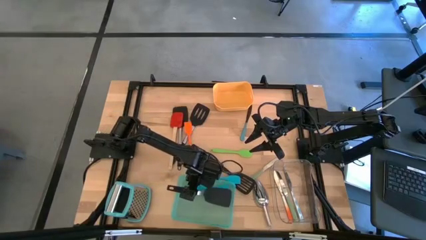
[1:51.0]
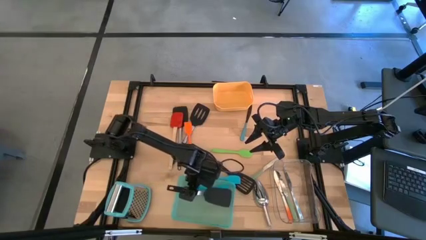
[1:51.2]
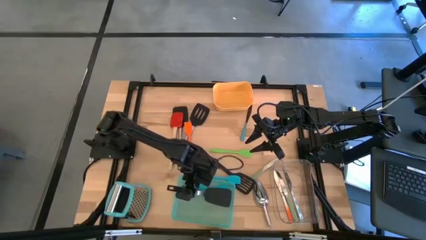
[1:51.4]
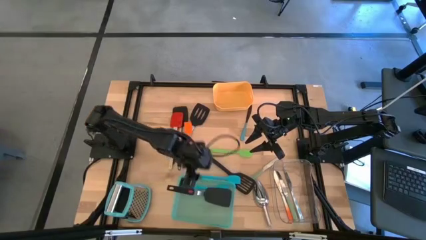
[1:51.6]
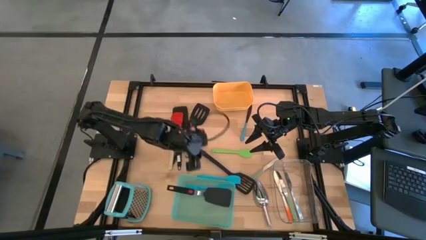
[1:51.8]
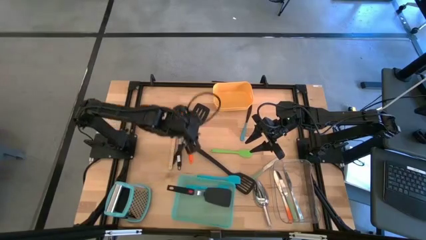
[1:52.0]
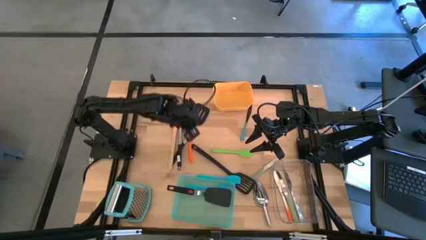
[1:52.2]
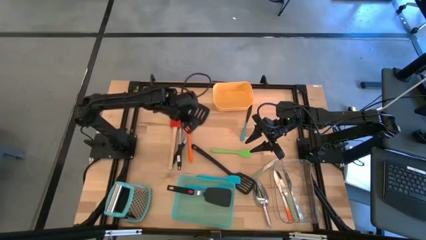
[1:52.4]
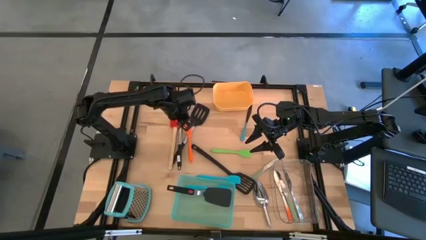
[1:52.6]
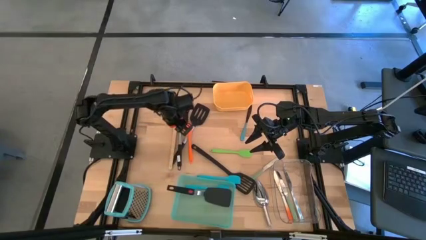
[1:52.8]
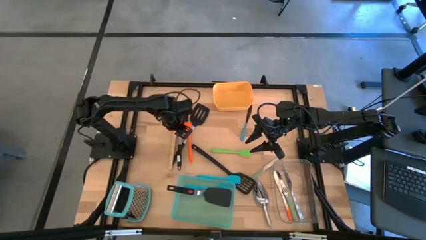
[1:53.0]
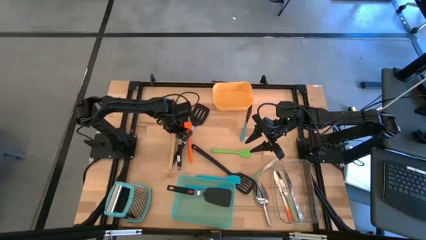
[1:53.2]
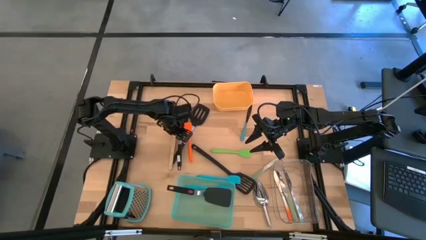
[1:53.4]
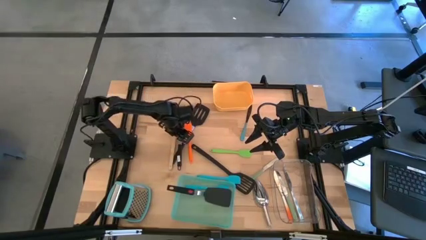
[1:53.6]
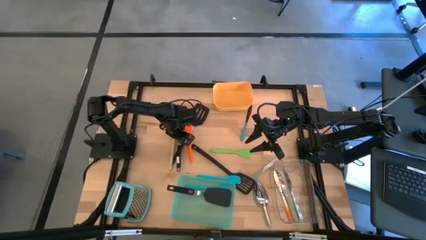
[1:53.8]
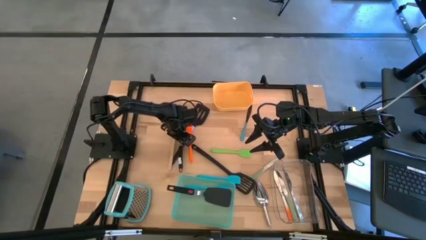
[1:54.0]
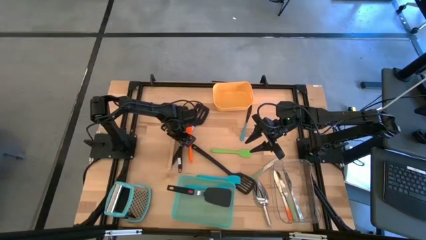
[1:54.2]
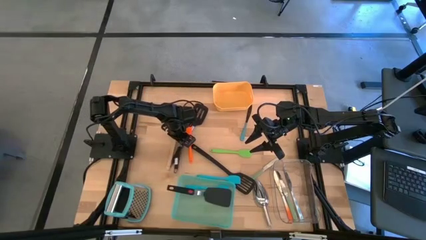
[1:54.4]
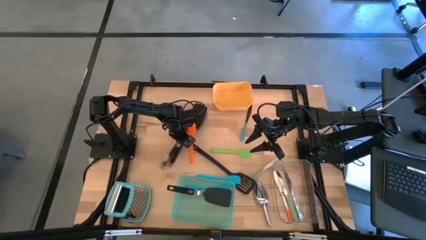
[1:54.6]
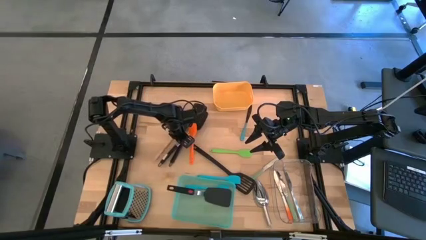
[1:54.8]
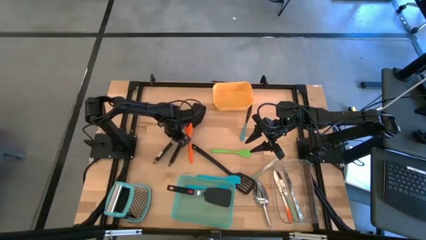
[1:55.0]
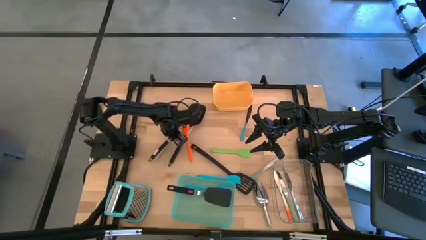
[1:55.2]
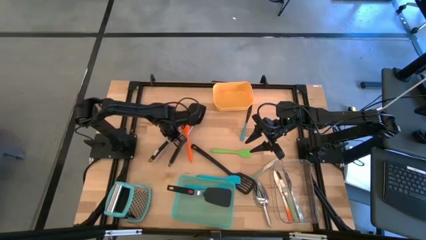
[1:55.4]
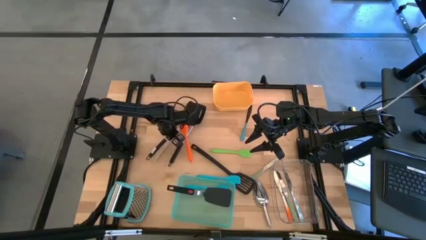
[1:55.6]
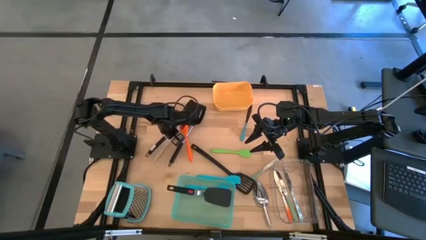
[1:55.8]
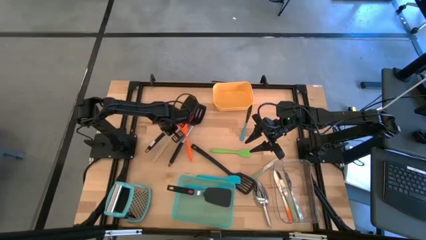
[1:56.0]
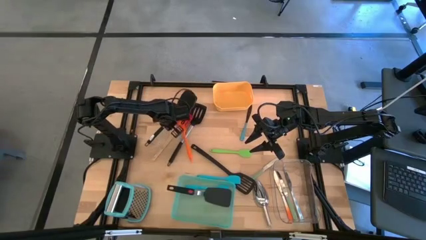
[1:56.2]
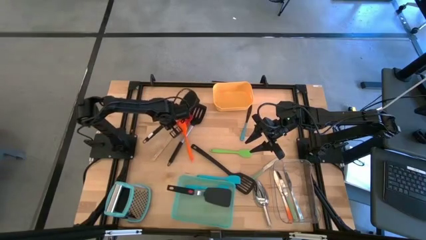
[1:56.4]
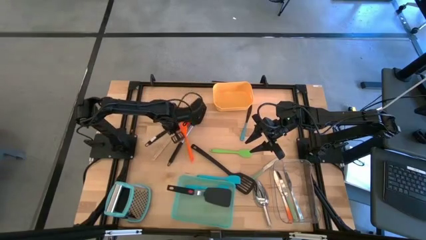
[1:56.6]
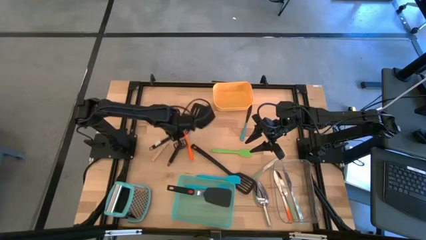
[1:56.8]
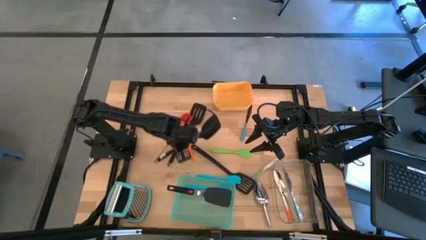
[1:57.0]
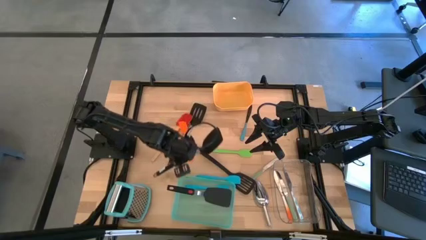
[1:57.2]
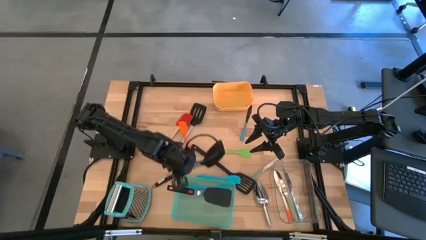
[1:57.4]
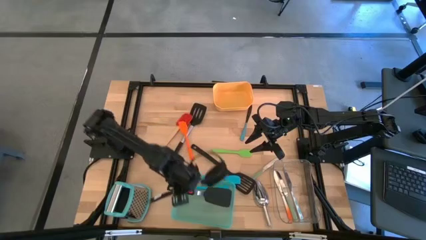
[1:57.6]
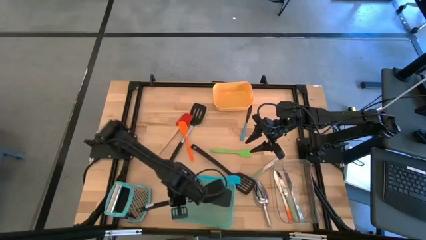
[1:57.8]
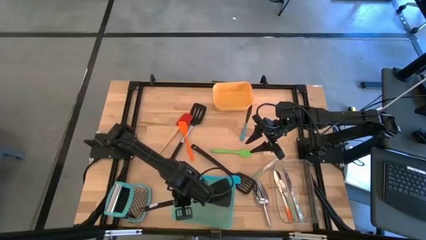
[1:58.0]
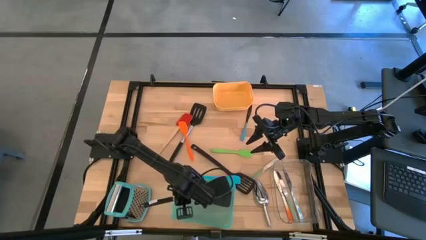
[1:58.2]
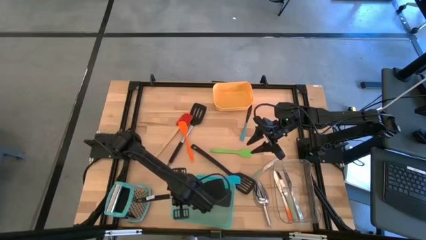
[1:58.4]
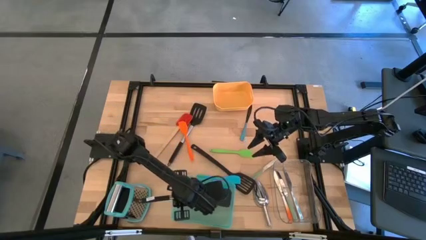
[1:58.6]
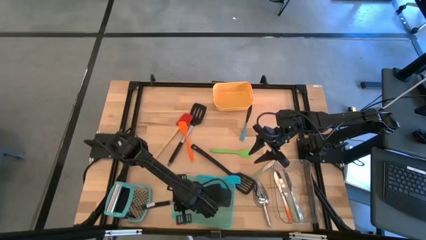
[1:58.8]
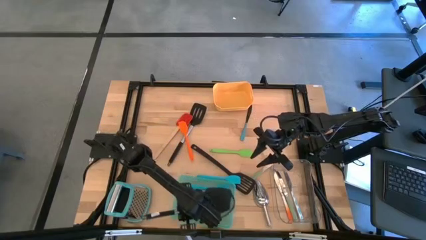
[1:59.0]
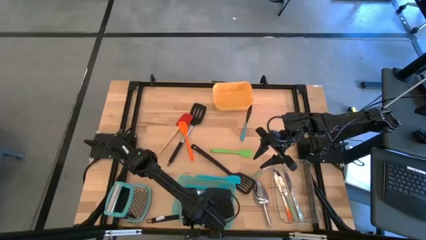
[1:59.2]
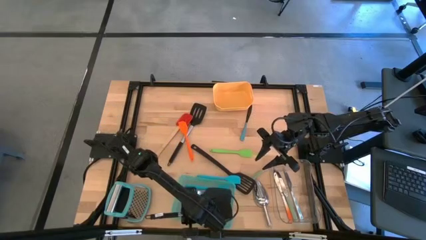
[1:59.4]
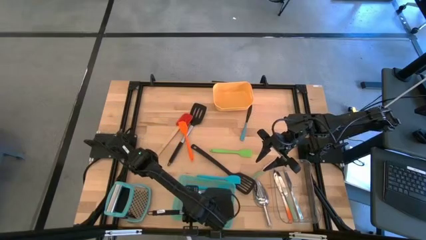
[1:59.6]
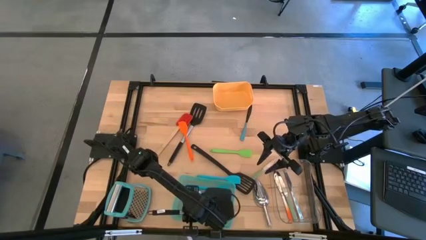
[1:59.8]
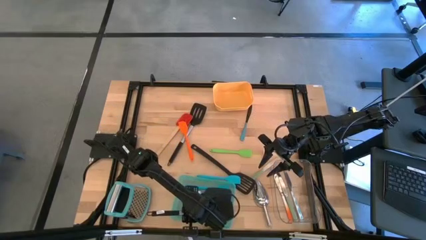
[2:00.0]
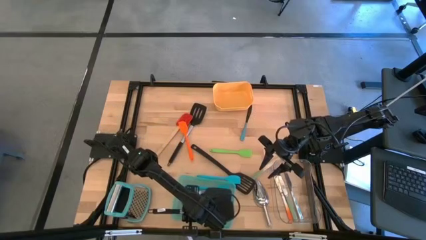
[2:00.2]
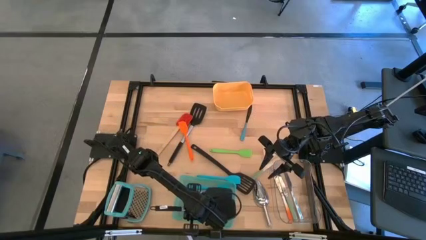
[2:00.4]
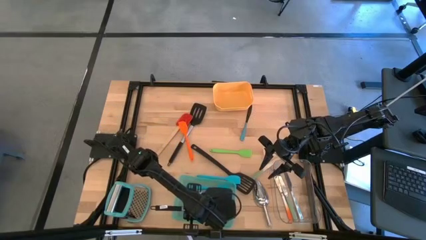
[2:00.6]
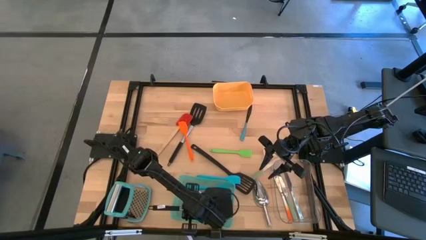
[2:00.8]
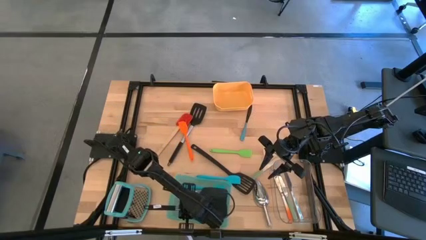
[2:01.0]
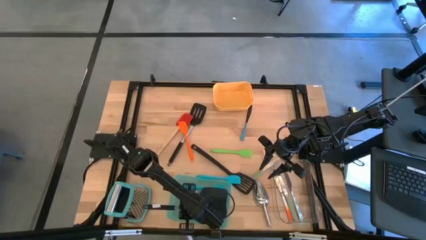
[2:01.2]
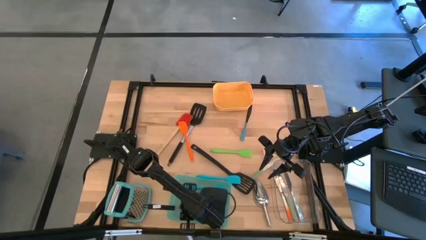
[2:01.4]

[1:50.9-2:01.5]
Task: Pick & Place Kitchen Items
Put the black spatula into the blue bin

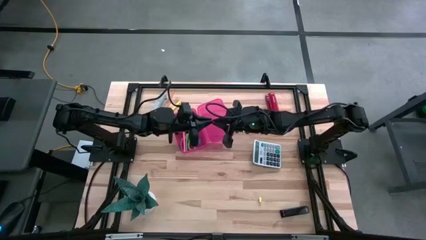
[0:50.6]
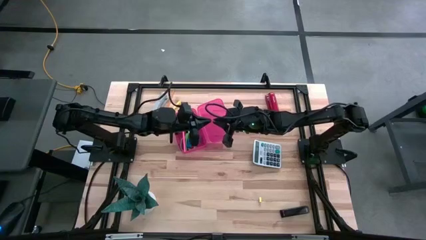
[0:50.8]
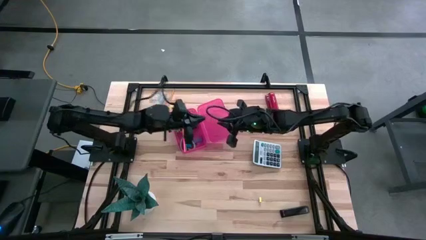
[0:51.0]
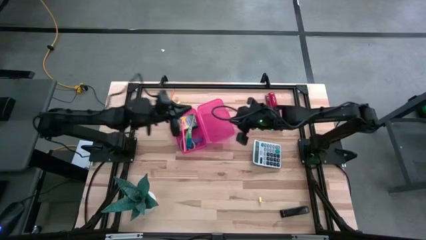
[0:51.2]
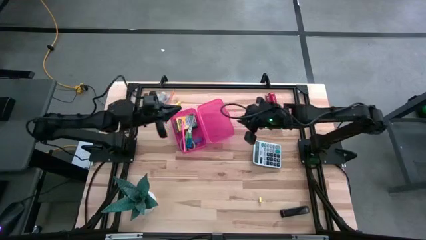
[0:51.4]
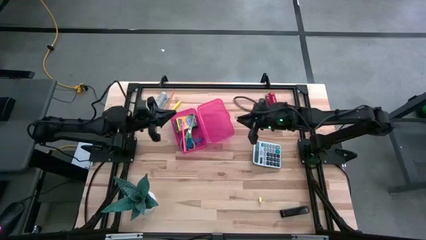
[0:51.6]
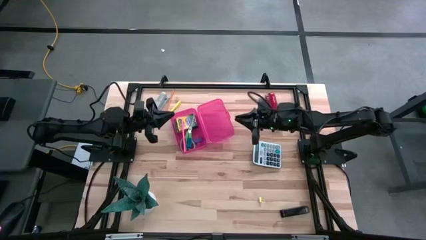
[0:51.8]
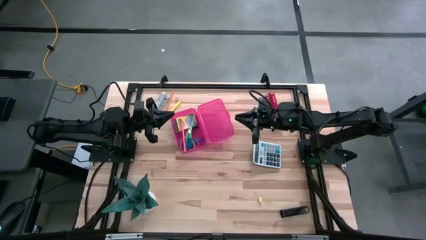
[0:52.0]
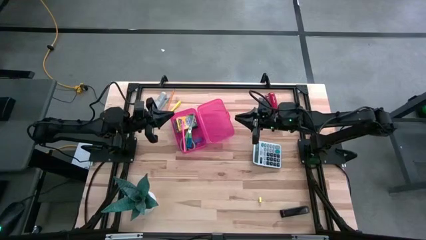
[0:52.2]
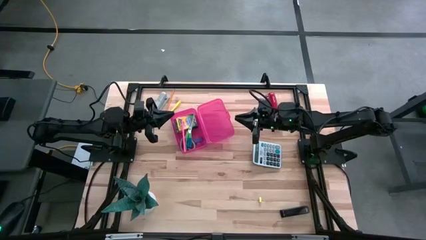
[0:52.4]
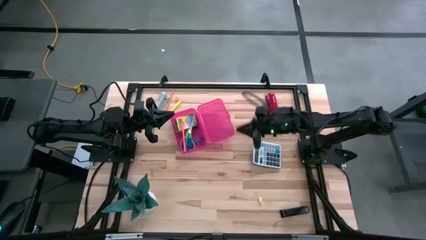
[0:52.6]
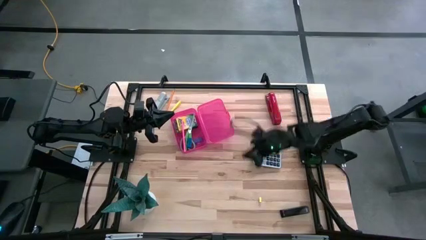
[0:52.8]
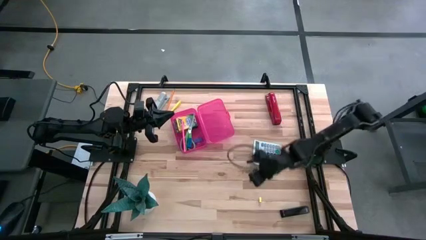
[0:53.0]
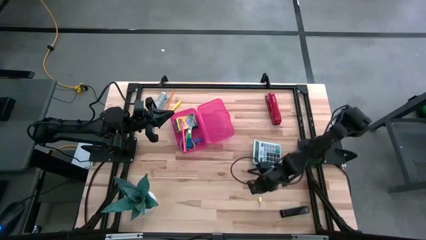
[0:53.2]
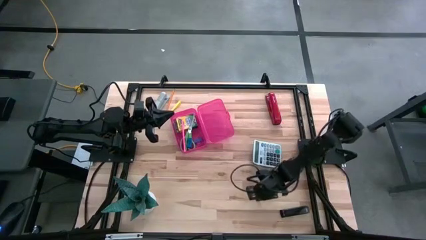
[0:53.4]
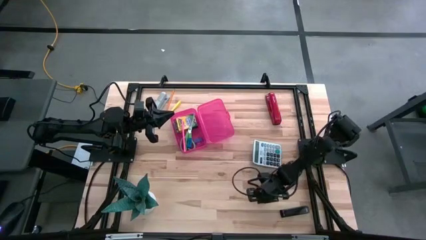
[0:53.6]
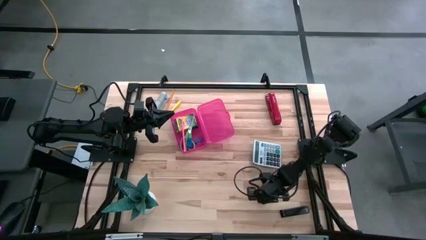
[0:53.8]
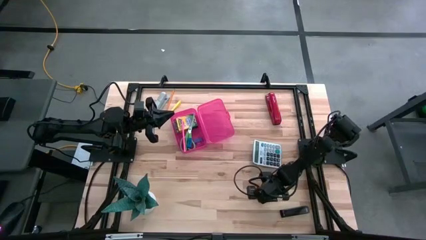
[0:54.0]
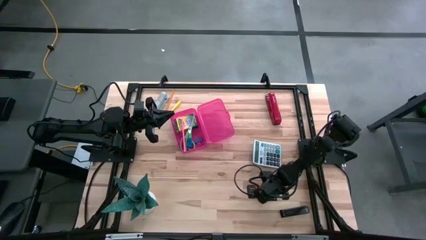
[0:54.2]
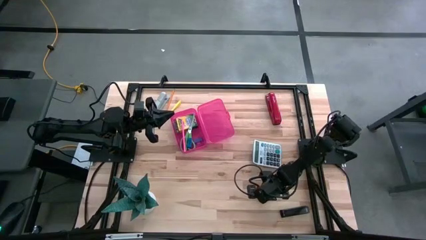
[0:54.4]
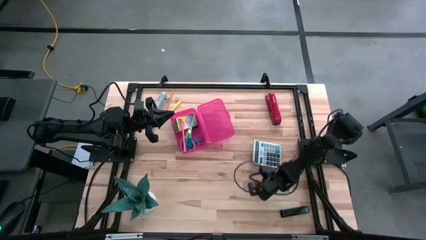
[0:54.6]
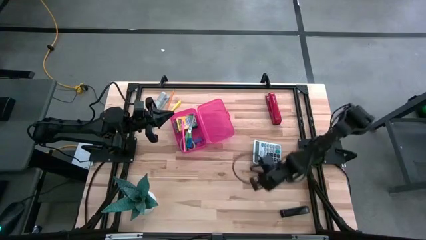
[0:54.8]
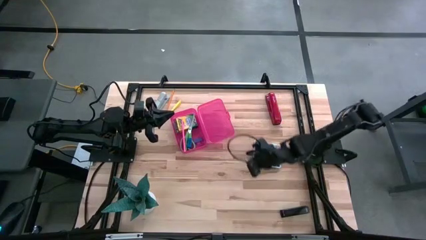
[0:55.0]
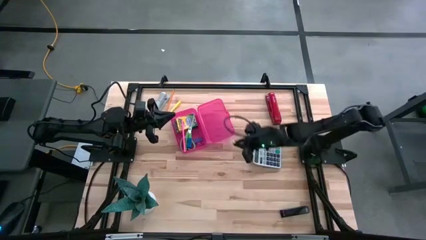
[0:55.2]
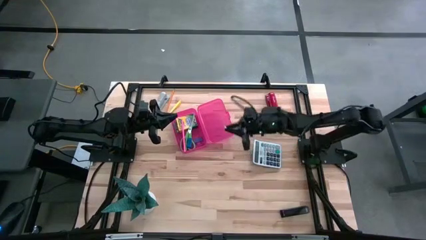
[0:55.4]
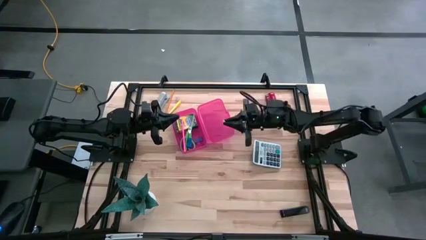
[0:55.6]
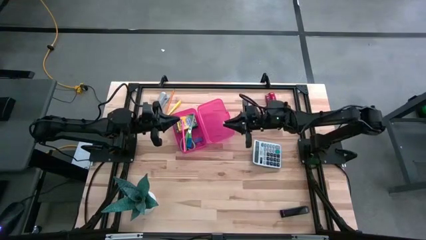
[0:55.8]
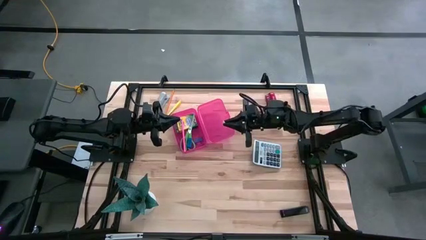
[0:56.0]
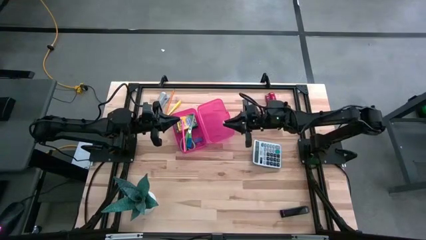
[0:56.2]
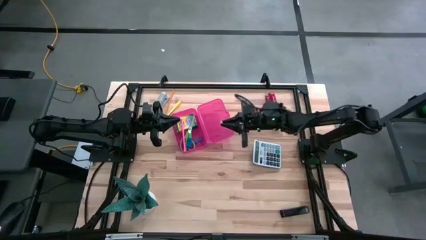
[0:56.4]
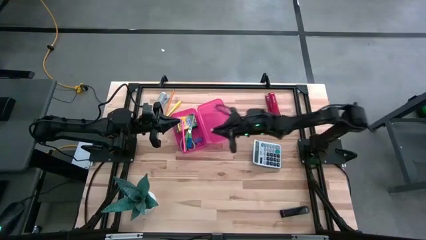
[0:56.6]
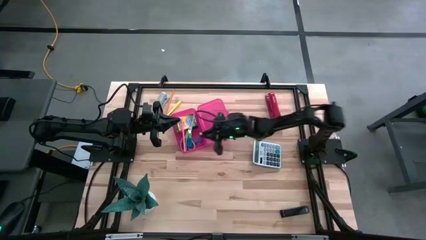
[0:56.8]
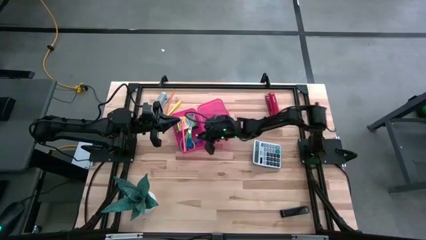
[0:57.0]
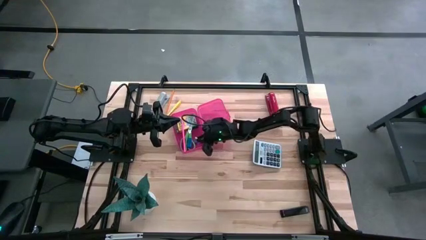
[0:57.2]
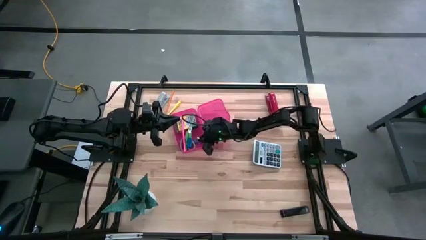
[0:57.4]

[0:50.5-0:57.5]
Task: Pack school essentials
Put the yellow eraser into the pink pencil box
